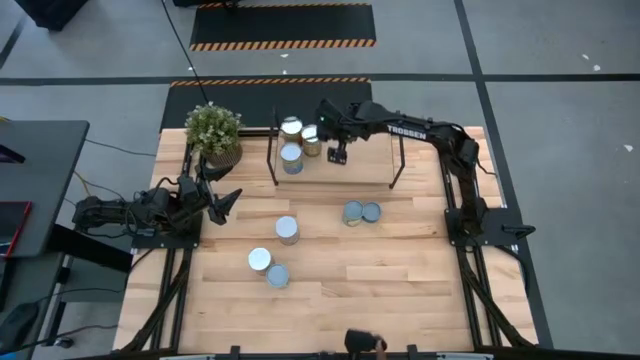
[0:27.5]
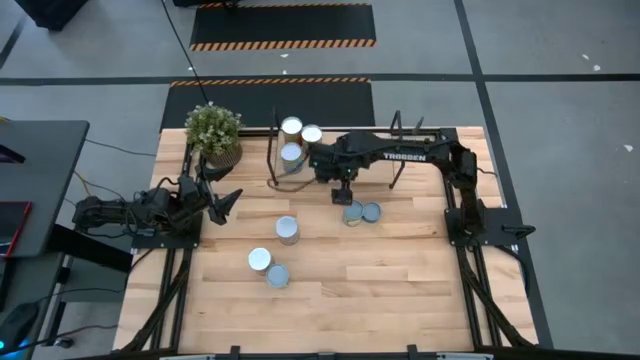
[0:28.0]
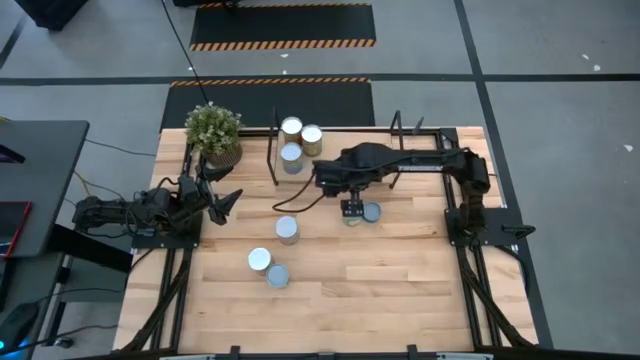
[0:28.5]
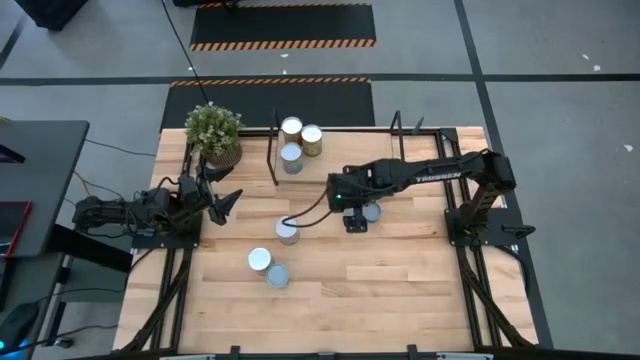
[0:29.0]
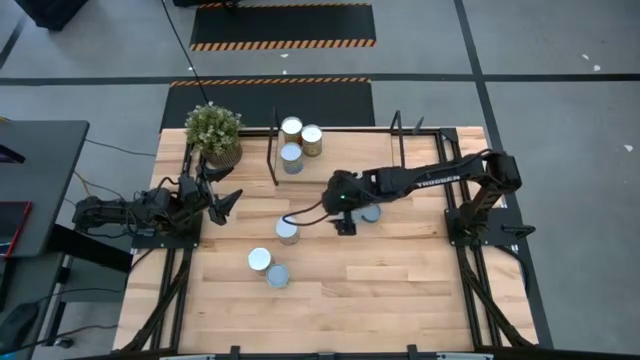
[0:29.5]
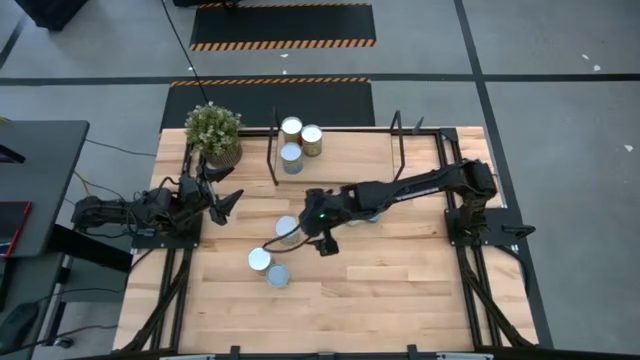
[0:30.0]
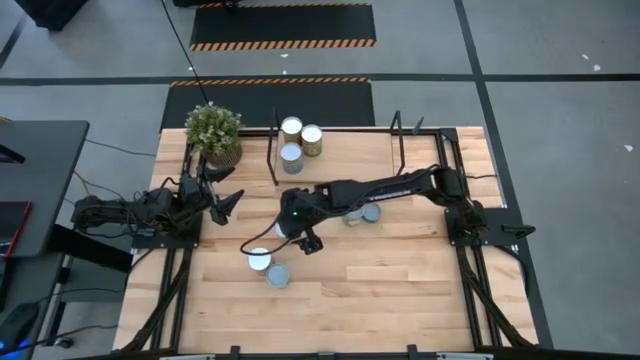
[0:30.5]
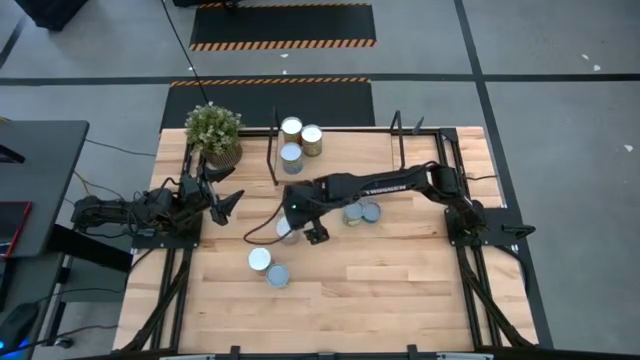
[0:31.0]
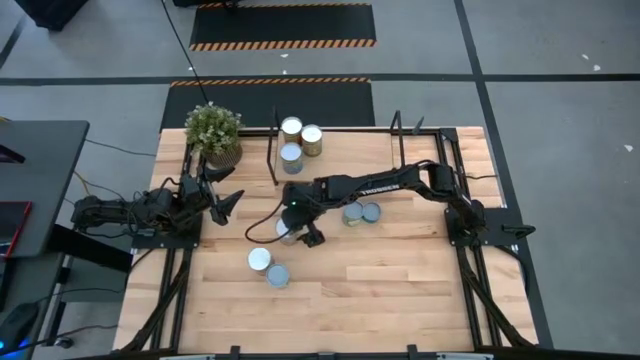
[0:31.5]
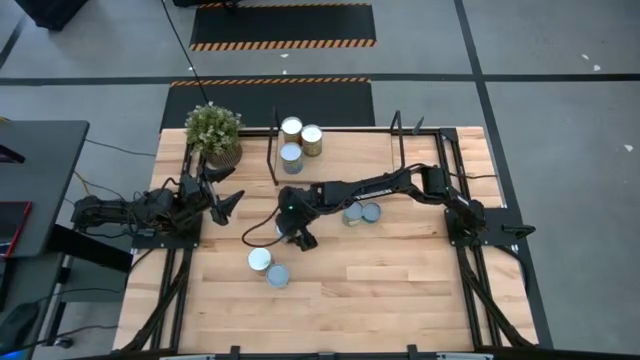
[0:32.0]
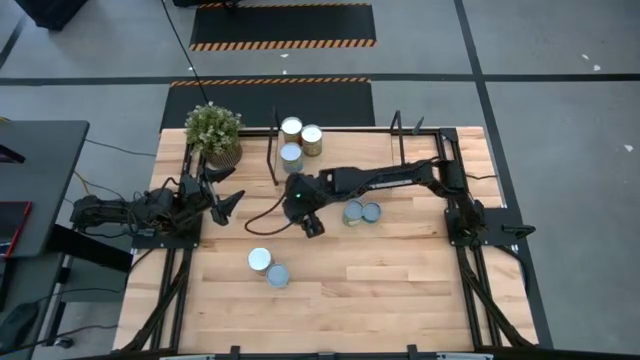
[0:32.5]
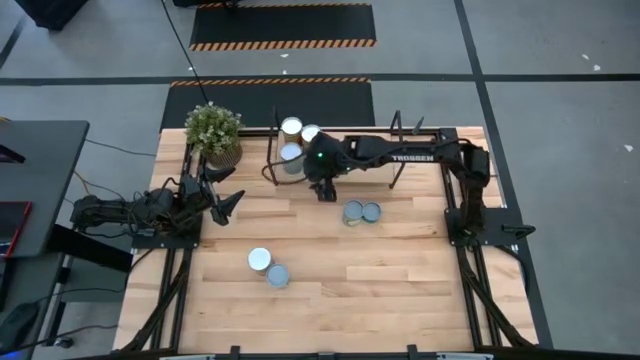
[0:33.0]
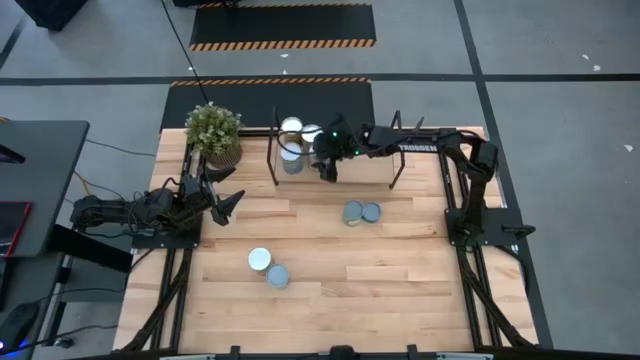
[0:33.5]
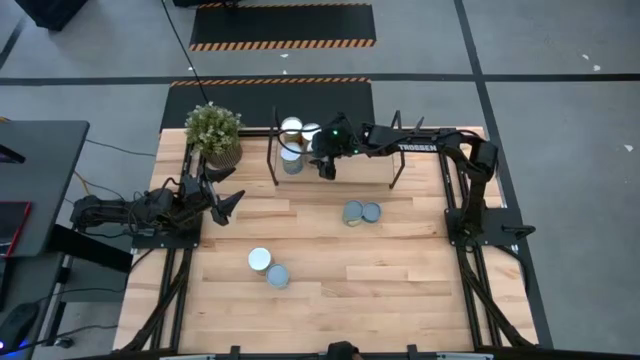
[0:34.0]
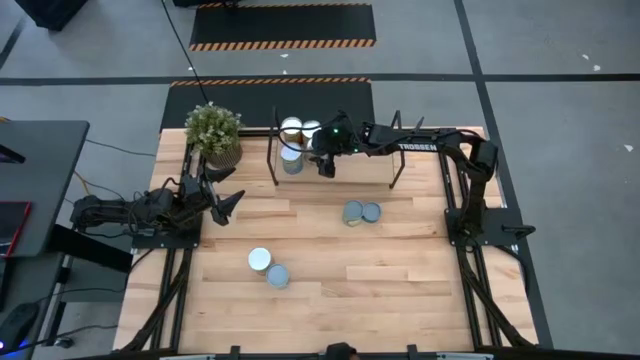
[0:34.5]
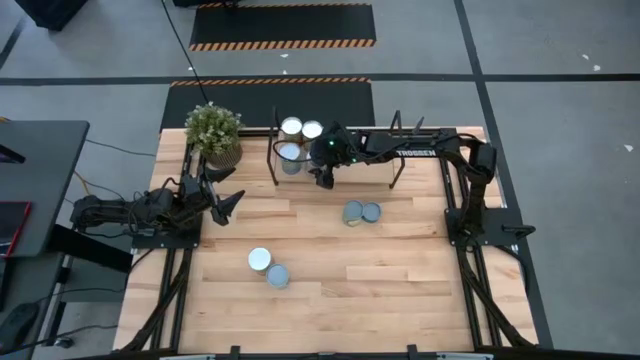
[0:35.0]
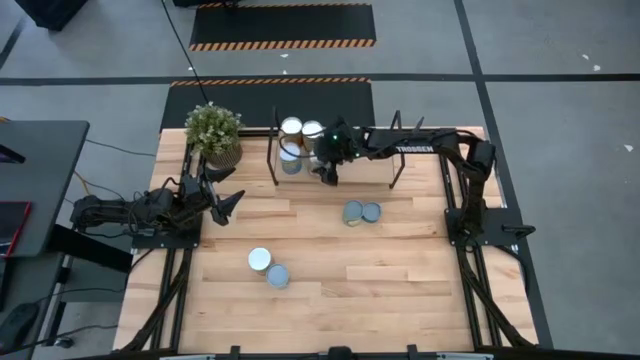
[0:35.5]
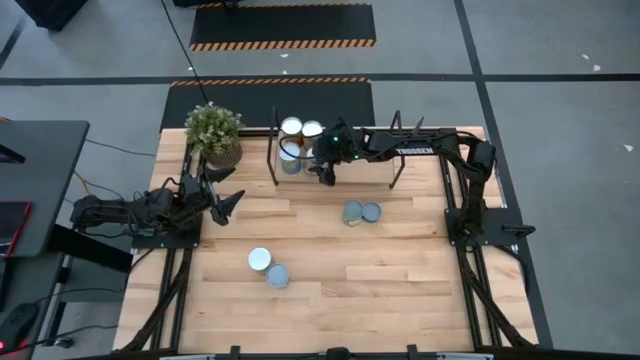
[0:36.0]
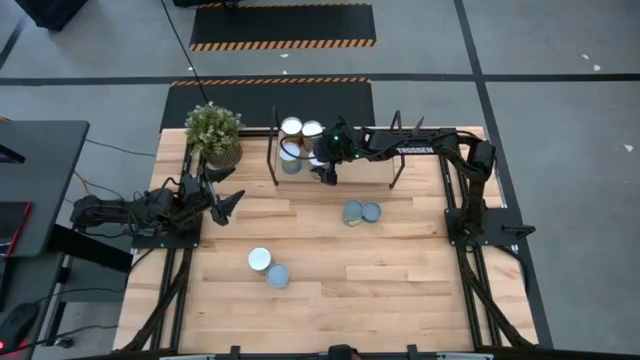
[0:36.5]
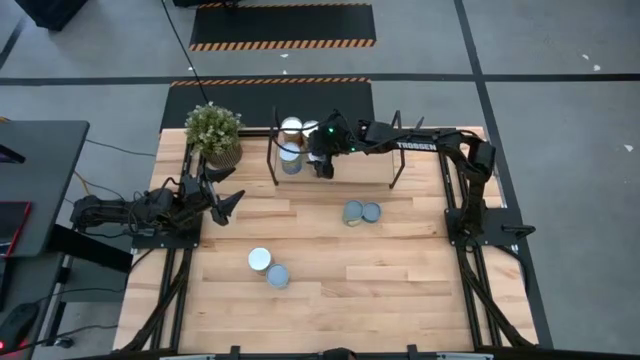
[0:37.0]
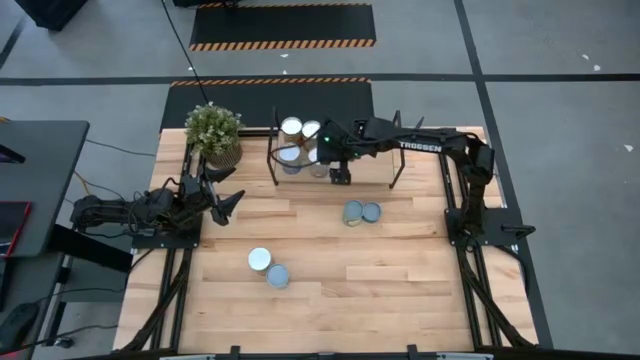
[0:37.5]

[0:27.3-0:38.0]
Task: Pick and place cans onto a shelf
Put the canned peaches on the shelf

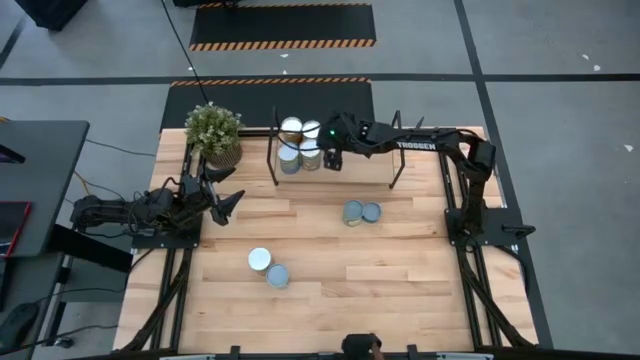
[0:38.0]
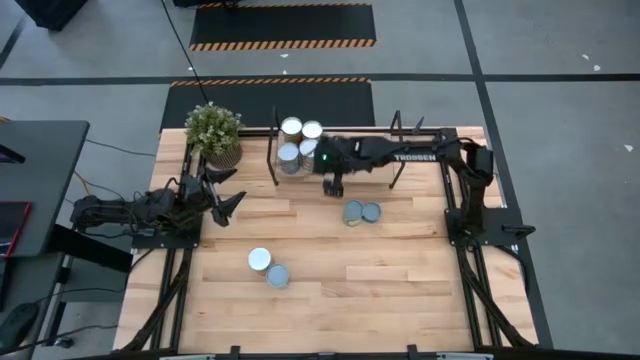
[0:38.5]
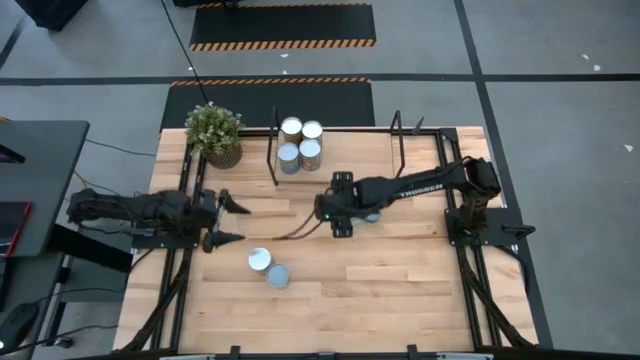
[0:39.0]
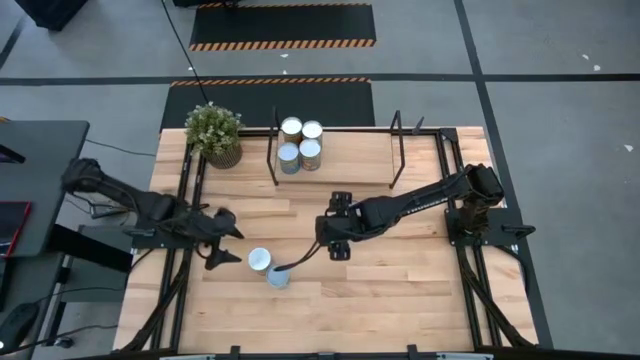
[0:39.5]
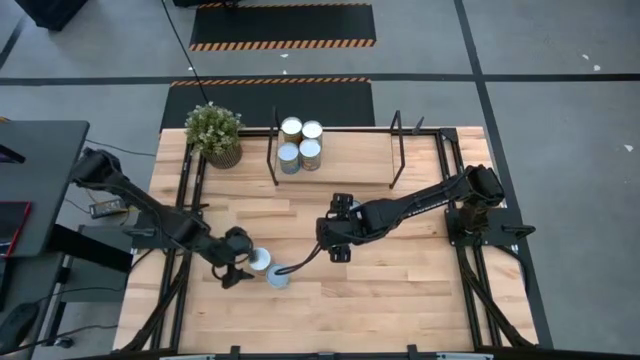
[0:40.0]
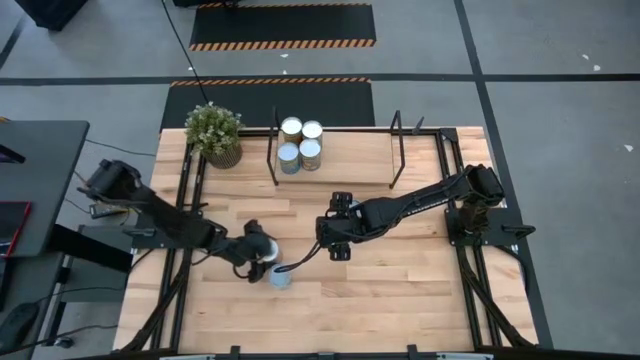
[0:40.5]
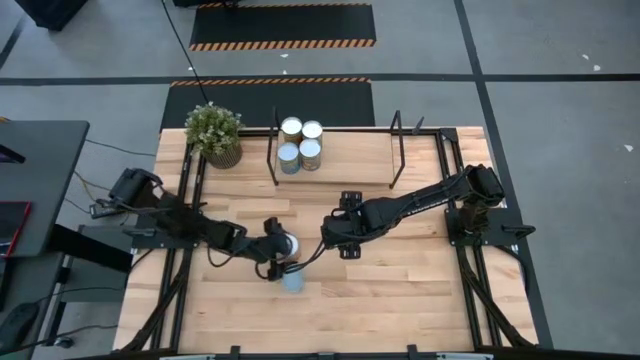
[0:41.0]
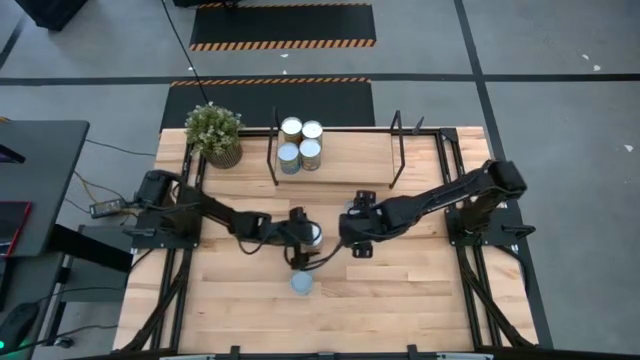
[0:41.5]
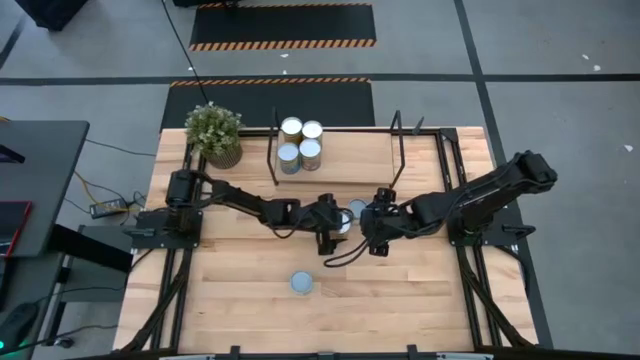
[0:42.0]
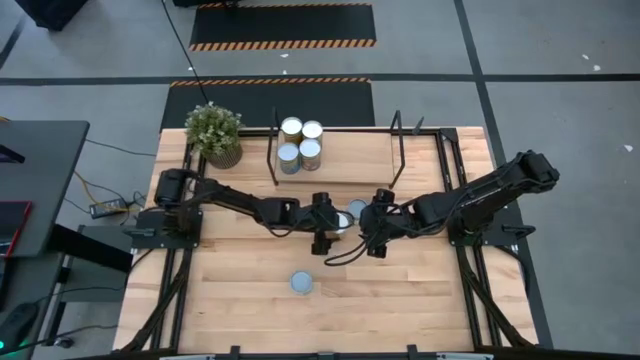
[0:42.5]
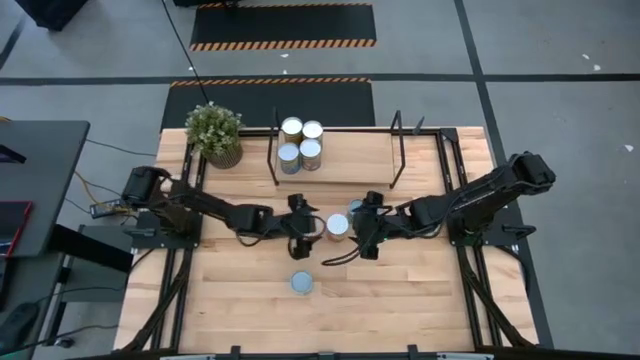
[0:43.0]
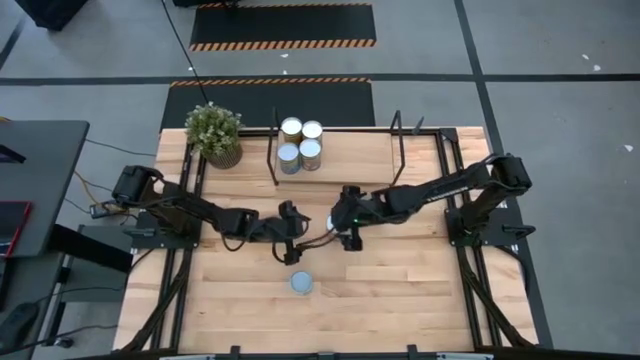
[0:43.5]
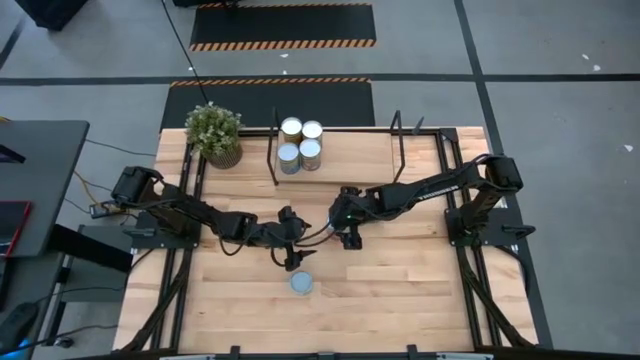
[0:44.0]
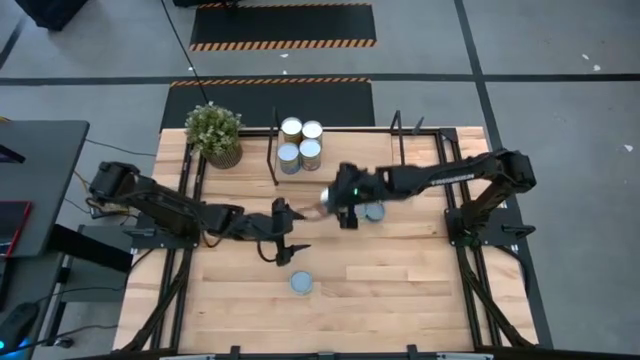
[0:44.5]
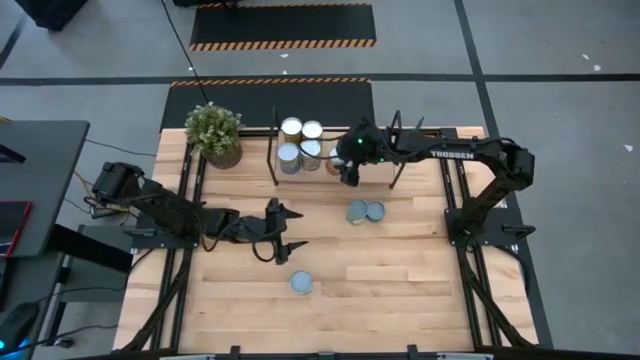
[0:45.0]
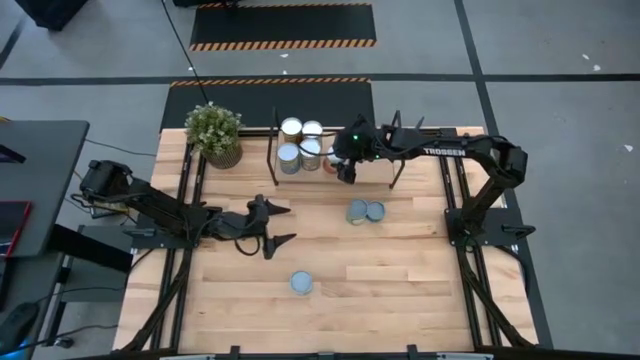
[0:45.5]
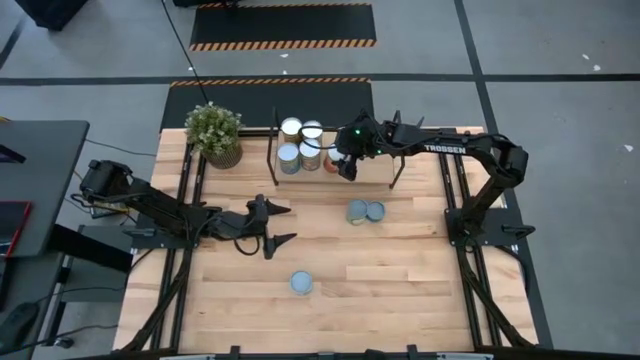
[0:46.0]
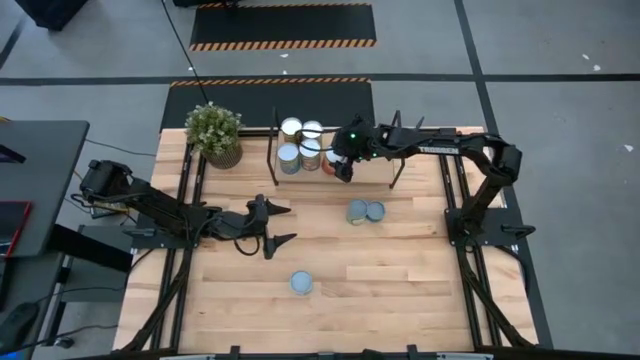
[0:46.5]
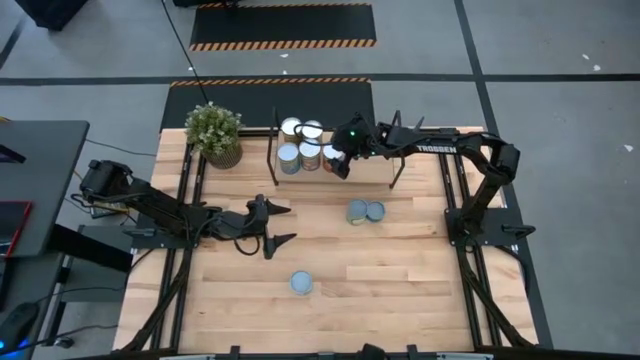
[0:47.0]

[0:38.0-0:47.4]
Put the canned corns on the shelf

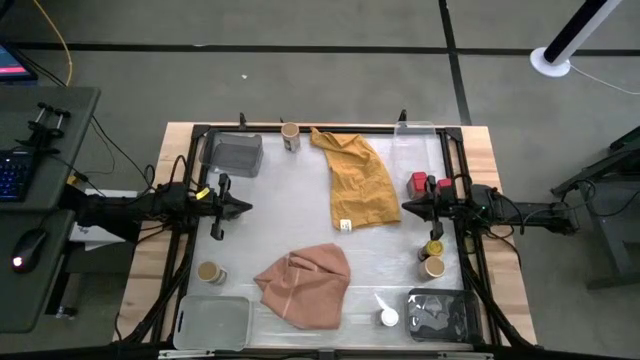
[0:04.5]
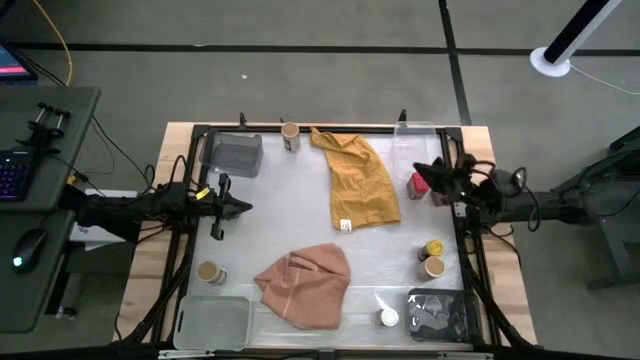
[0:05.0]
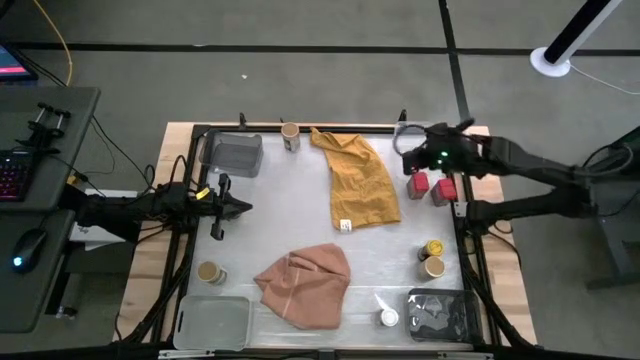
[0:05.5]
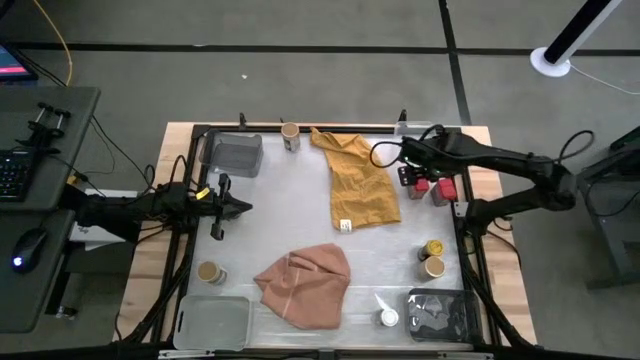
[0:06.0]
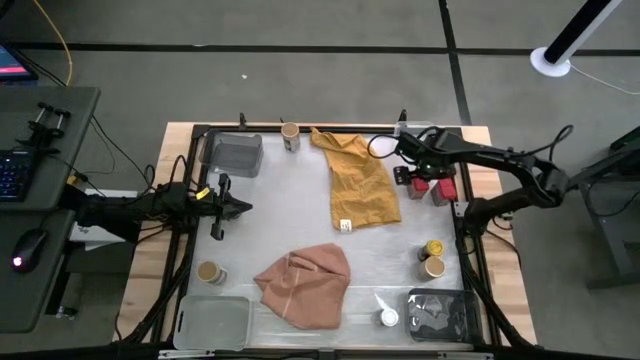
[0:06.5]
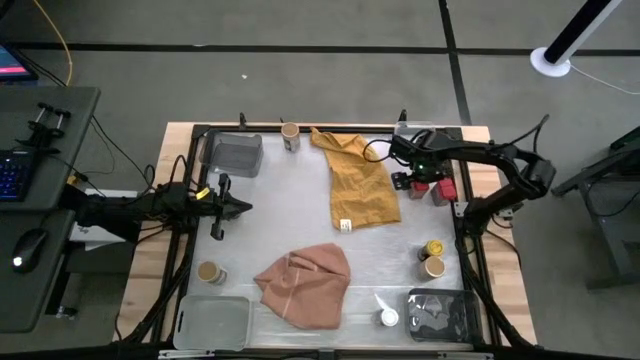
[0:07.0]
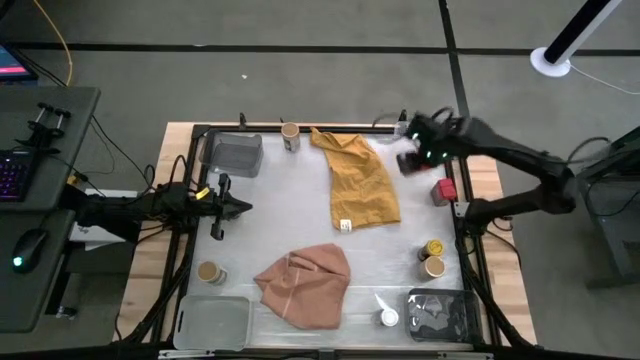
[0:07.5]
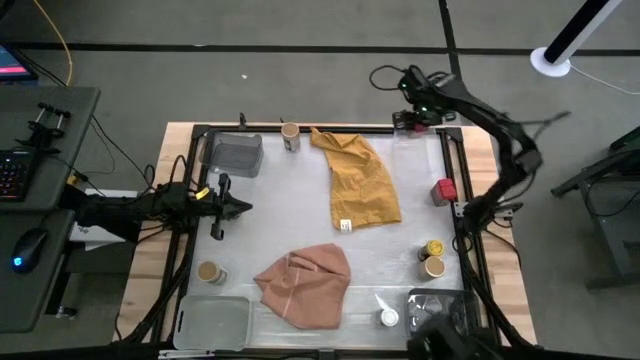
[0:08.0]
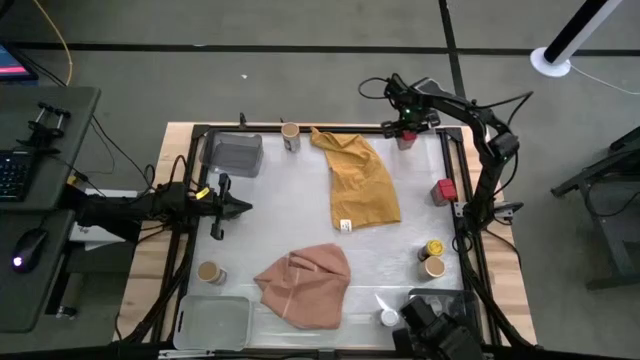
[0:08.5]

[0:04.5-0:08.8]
Task: Sort spices by type
Put the top right red seasoning bottle into the transparent bin
